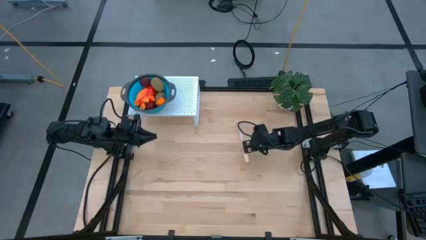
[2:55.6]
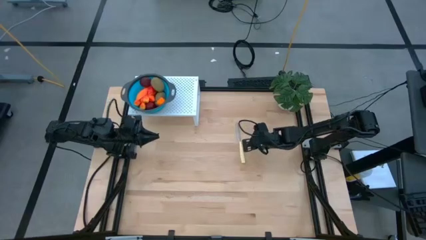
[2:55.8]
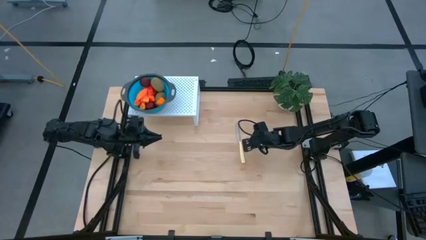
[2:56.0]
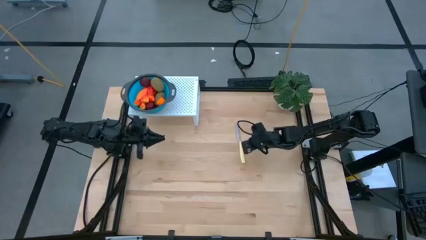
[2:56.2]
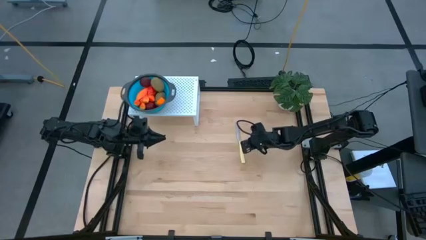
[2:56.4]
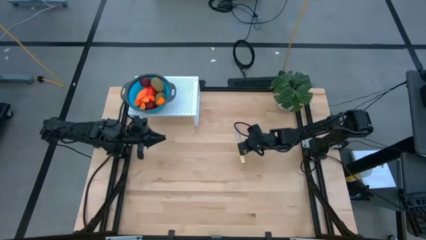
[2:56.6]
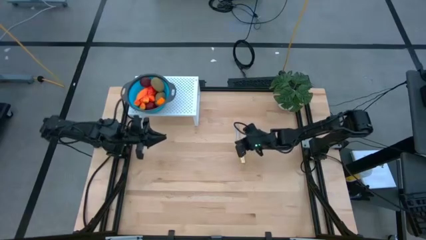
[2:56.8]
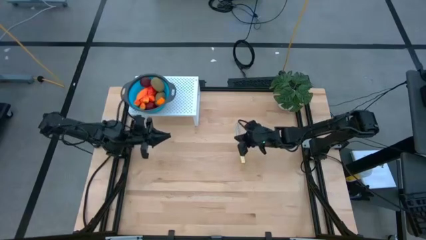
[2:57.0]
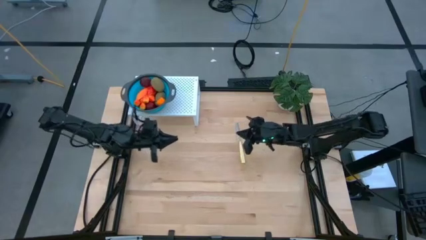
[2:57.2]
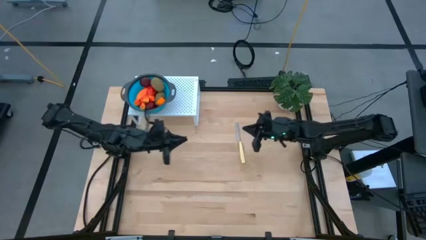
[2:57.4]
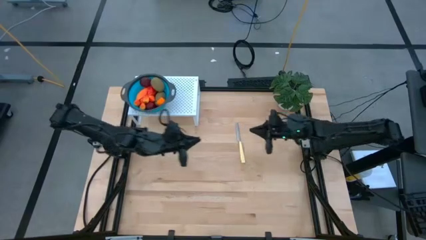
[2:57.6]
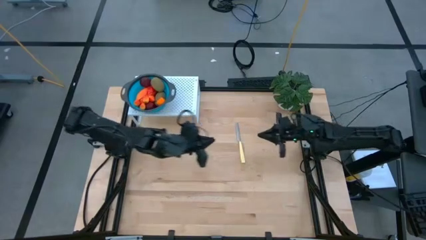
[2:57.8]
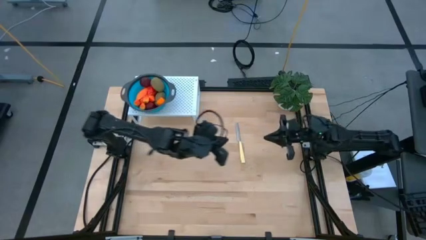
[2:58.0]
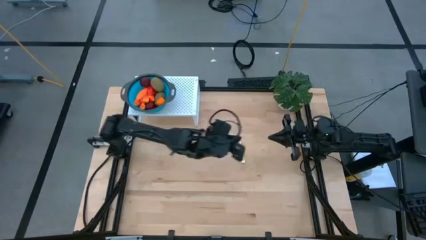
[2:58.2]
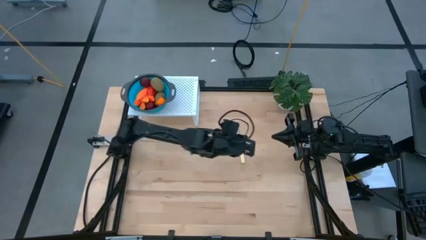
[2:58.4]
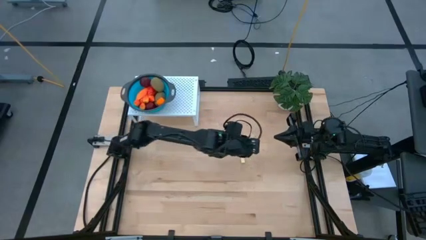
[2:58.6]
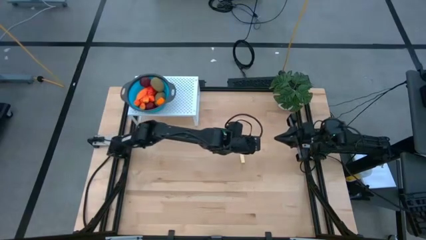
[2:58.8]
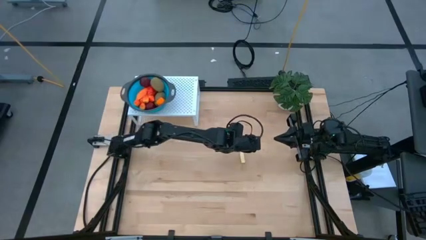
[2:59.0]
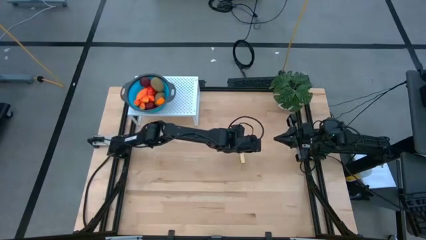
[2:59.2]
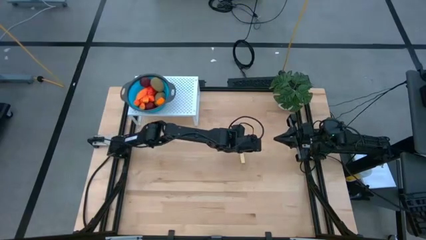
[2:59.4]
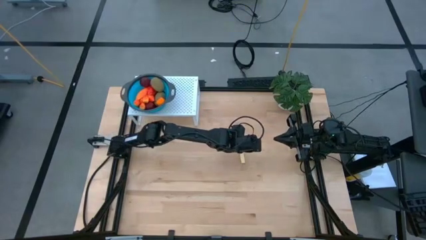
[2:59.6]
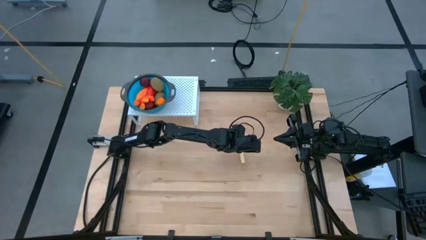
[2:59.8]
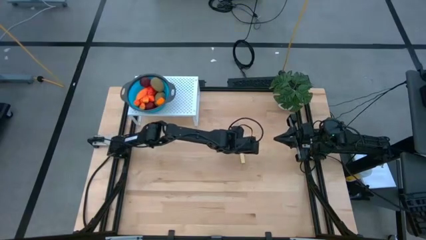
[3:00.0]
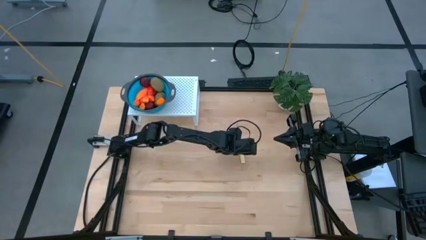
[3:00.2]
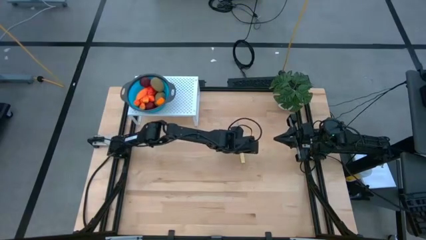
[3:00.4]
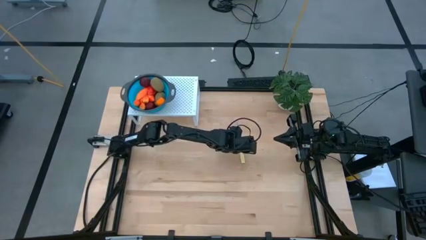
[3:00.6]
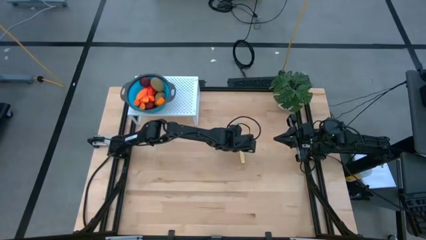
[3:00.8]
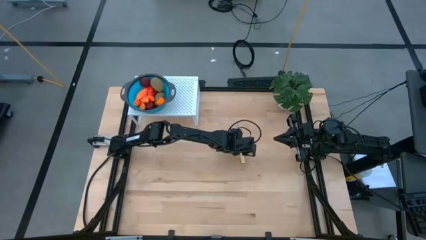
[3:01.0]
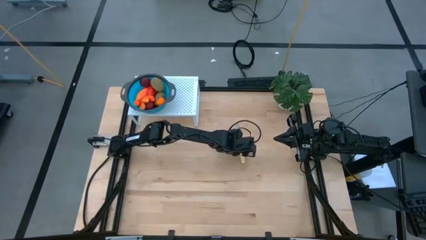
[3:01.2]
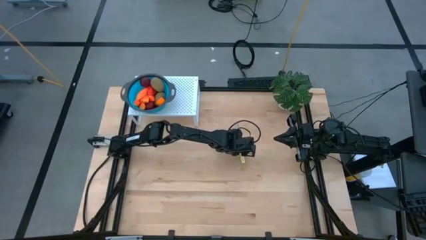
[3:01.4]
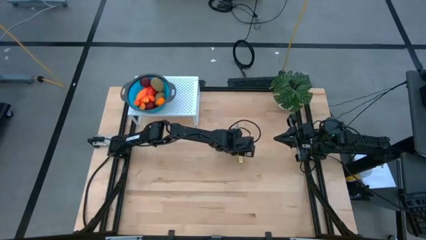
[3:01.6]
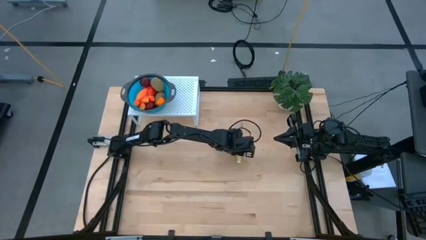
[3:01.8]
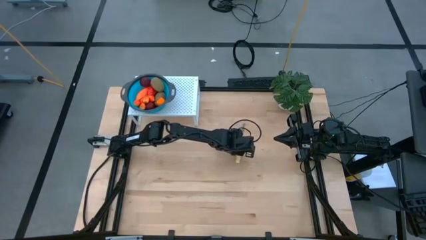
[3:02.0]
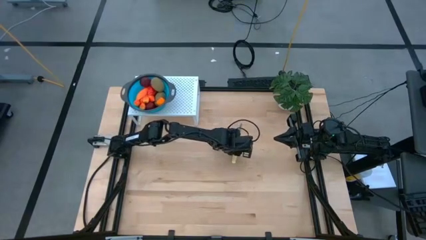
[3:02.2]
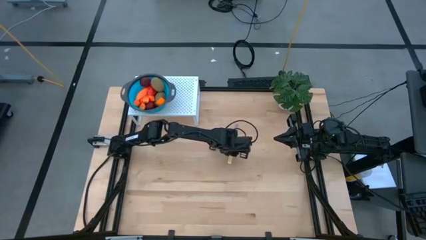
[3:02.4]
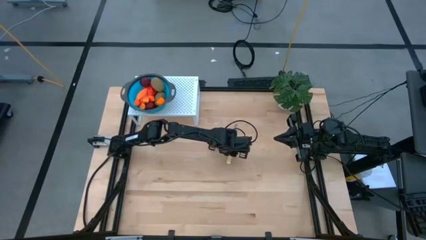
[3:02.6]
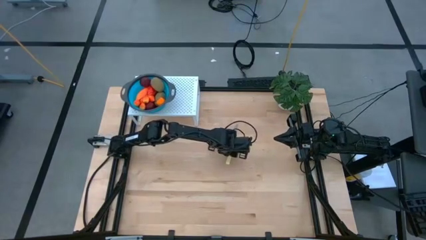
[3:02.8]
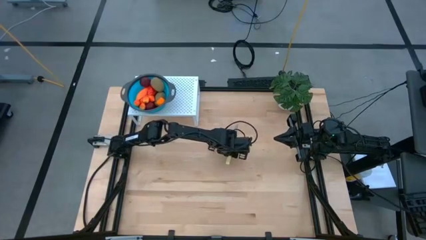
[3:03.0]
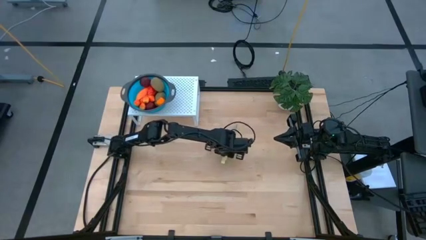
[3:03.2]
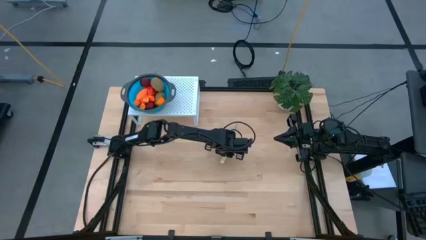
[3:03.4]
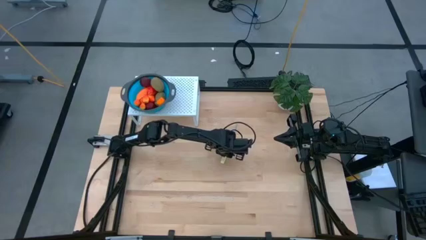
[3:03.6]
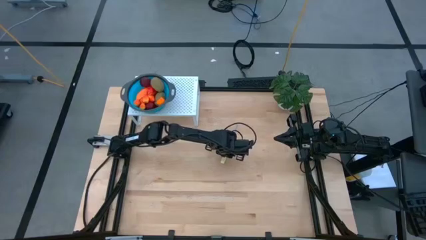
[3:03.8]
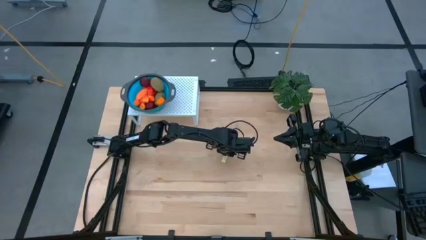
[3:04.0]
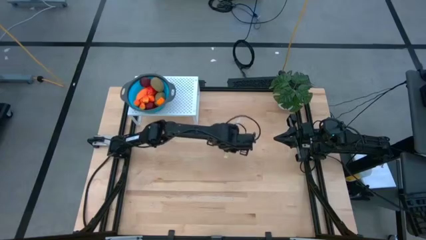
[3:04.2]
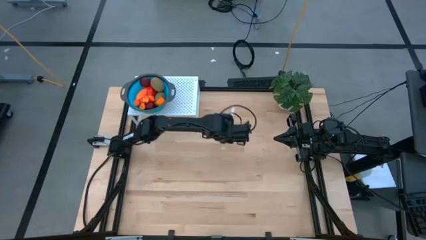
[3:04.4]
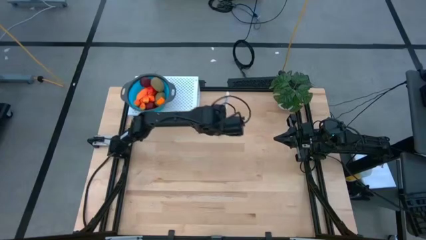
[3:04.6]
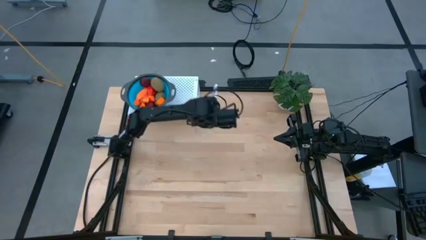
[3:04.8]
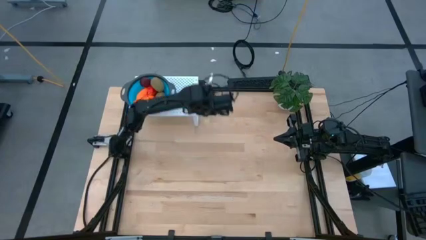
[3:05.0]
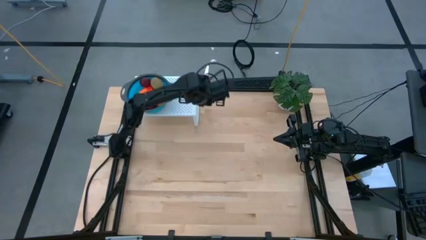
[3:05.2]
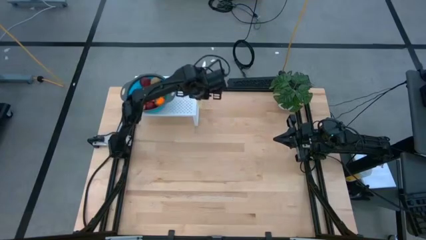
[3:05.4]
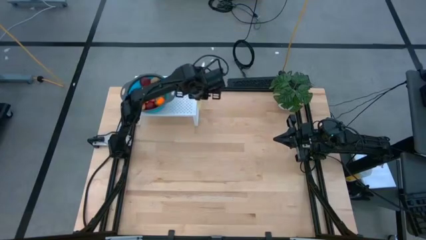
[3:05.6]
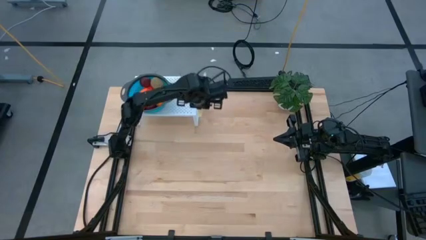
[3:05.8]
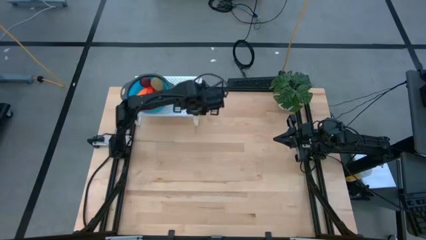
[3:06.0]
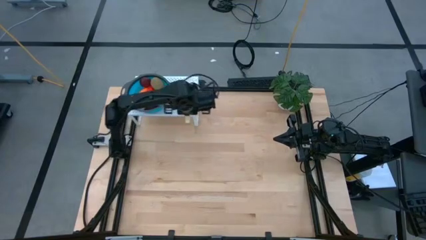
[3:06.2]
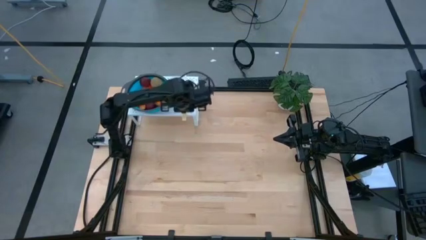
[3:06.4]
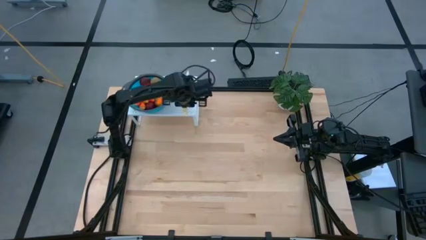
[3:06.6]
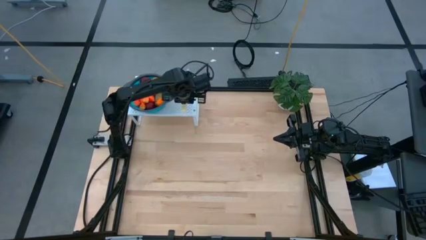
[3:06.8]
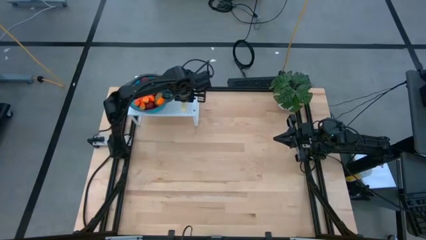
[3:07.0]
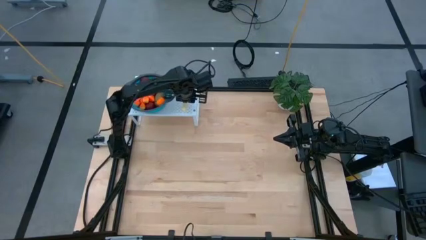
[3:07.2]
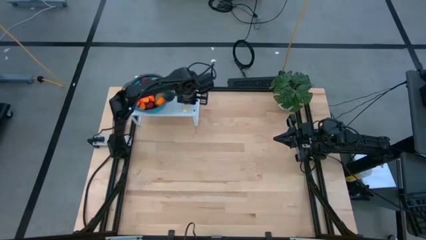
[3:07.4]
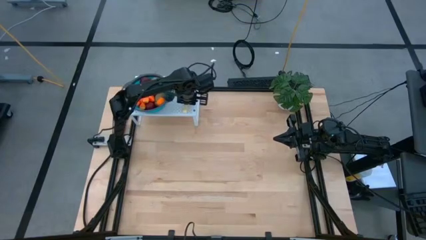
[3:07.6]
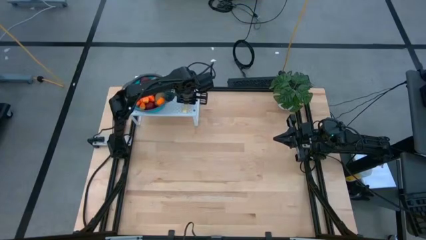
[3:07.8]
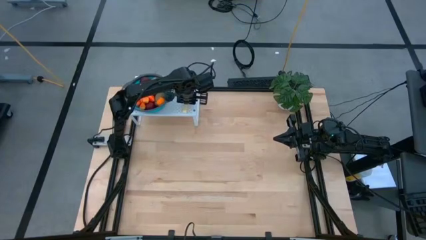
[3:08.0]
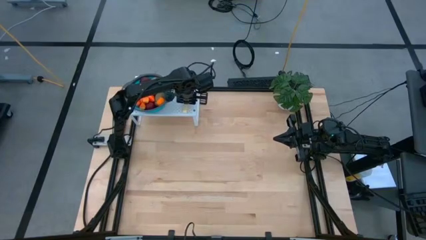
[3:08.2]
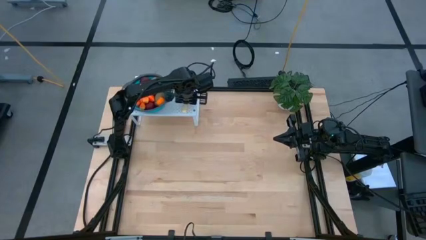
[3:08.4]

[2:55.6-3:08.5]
Task: Pick & Place Fruit
Put the yellow knife on the shelf
